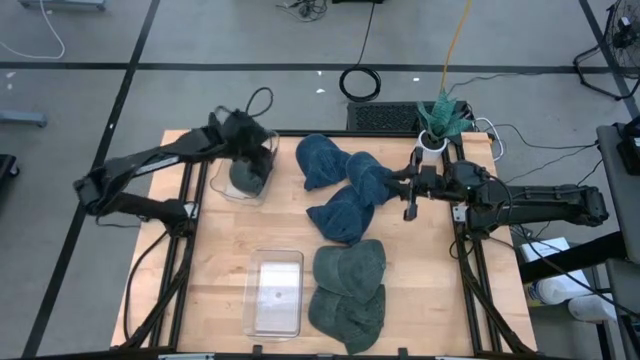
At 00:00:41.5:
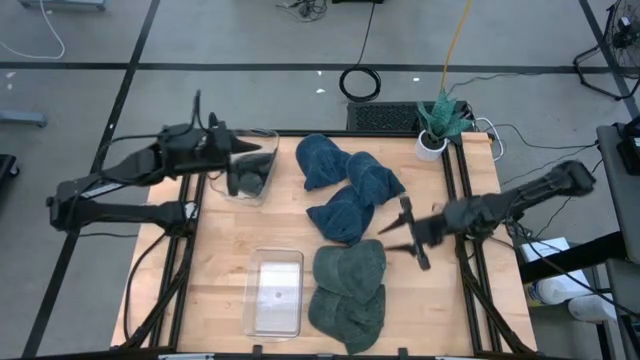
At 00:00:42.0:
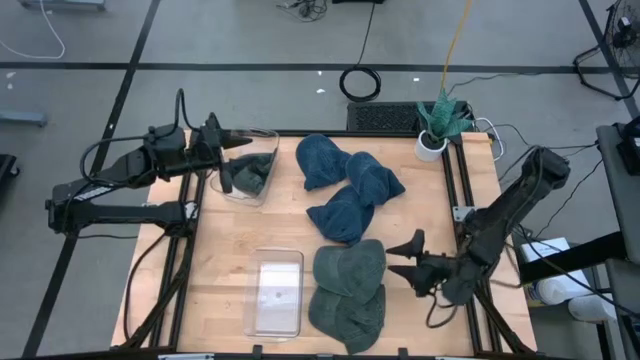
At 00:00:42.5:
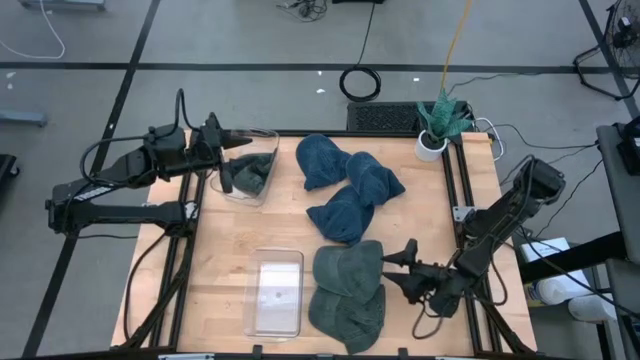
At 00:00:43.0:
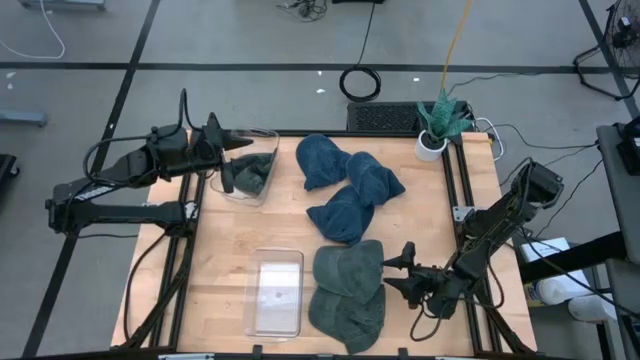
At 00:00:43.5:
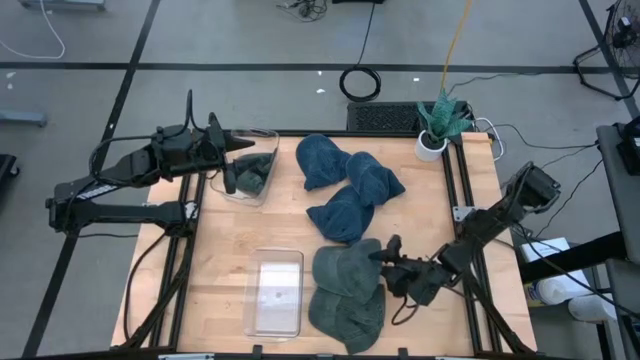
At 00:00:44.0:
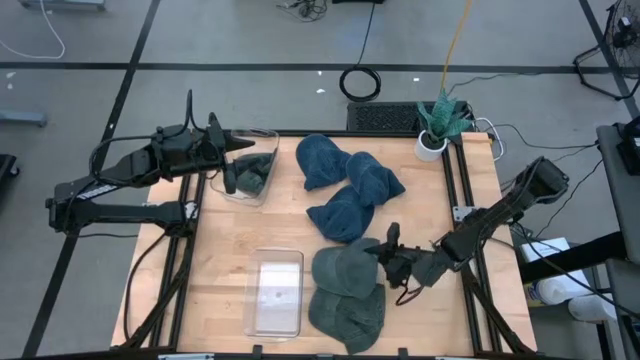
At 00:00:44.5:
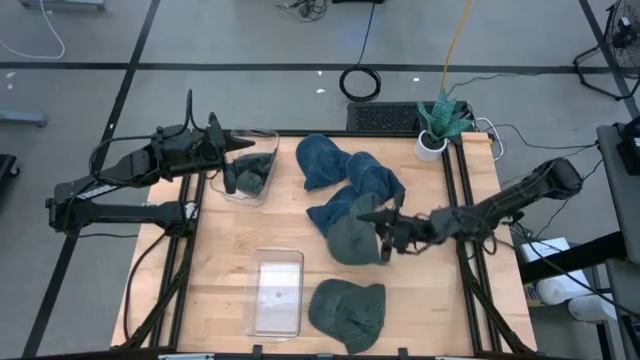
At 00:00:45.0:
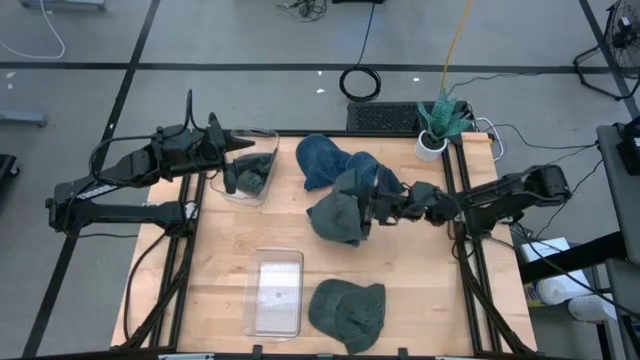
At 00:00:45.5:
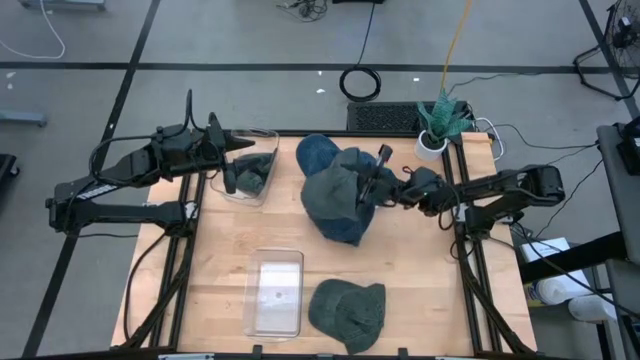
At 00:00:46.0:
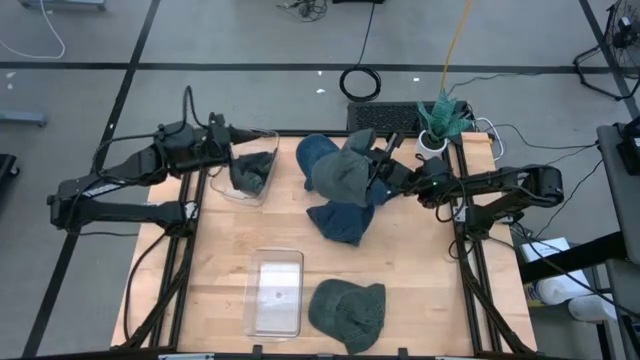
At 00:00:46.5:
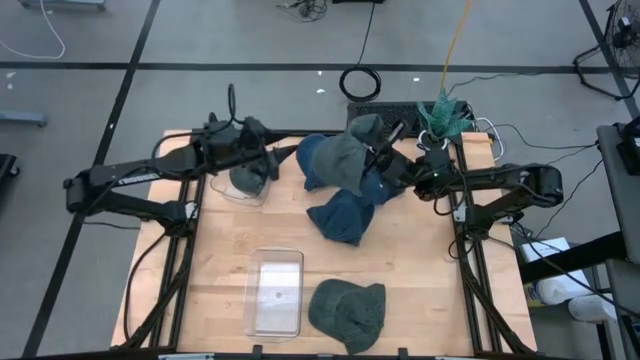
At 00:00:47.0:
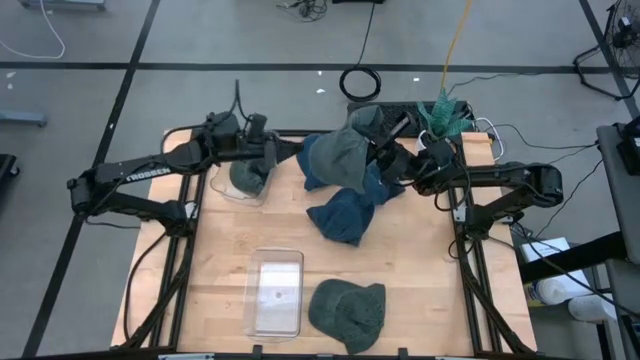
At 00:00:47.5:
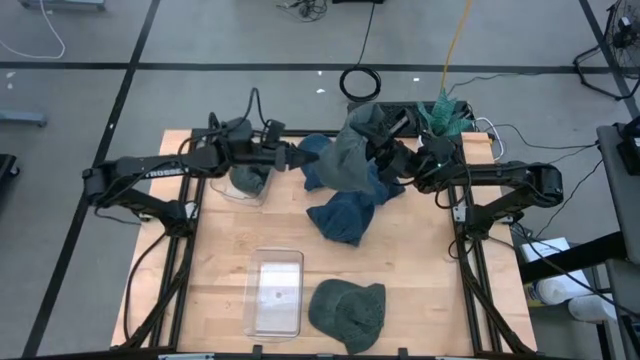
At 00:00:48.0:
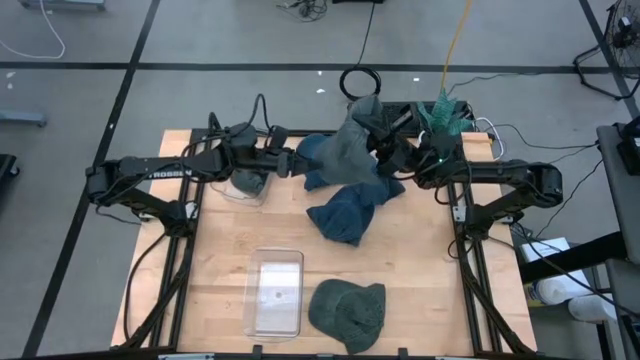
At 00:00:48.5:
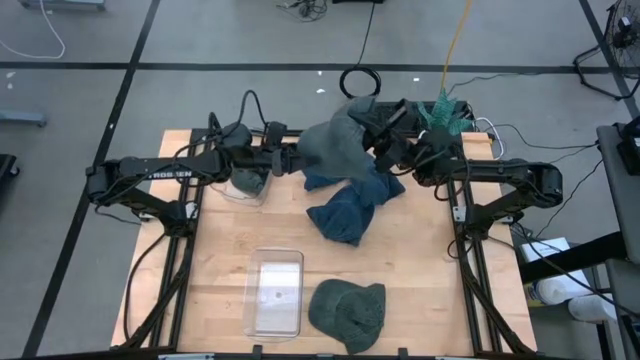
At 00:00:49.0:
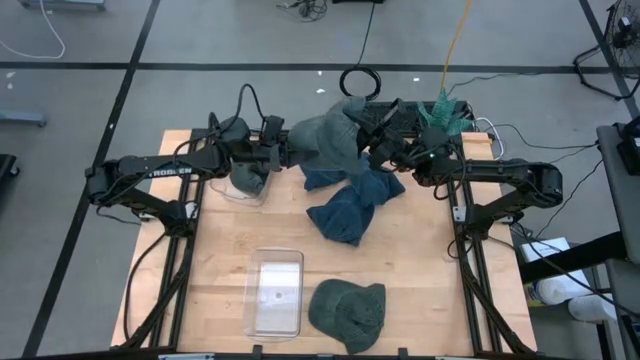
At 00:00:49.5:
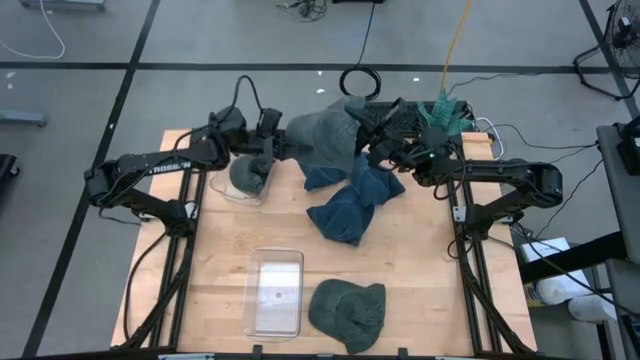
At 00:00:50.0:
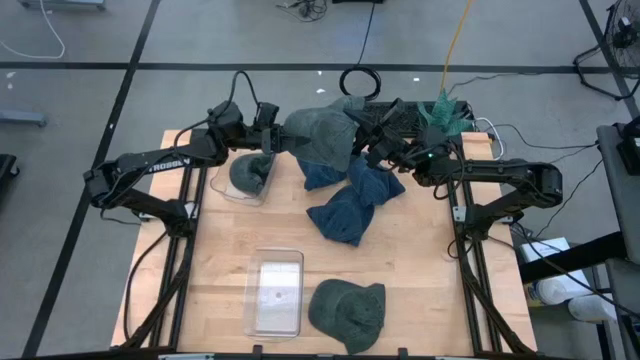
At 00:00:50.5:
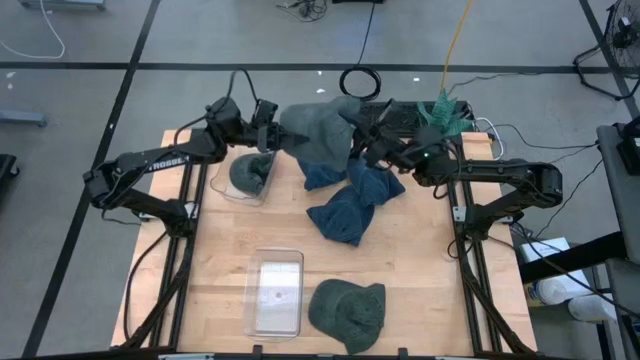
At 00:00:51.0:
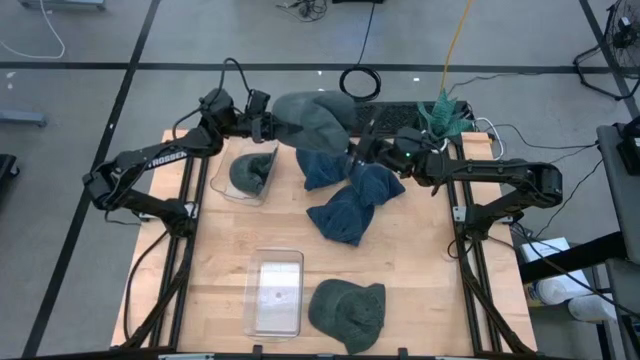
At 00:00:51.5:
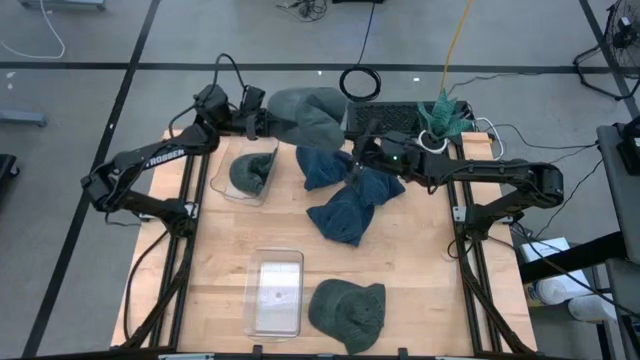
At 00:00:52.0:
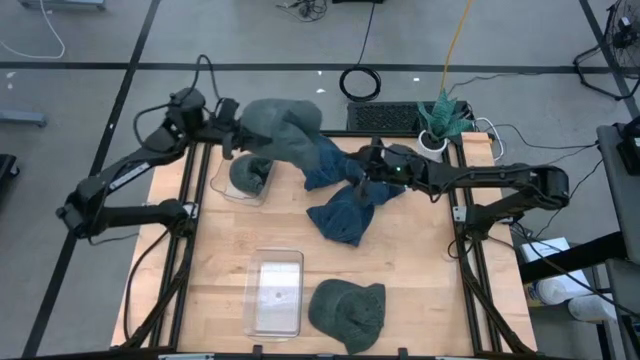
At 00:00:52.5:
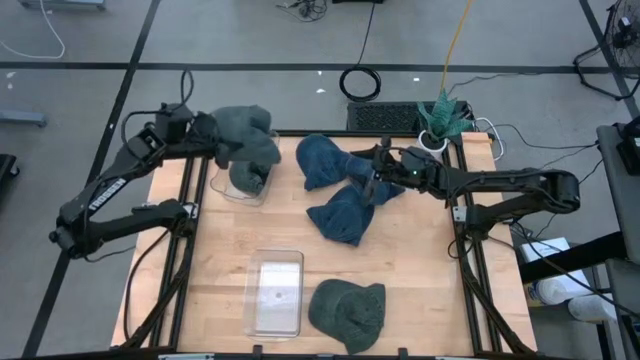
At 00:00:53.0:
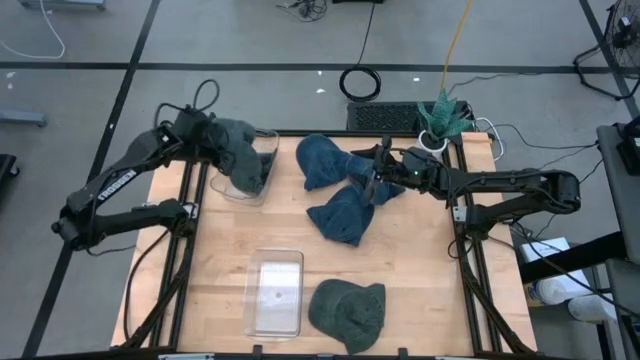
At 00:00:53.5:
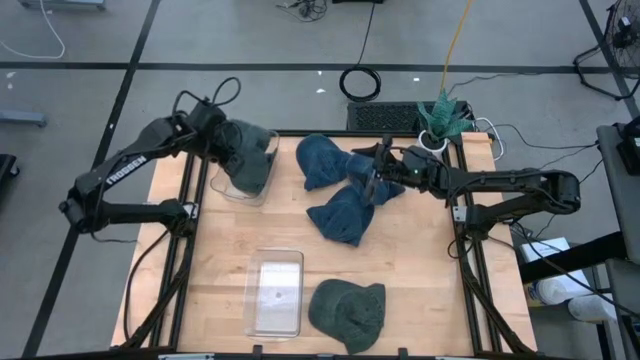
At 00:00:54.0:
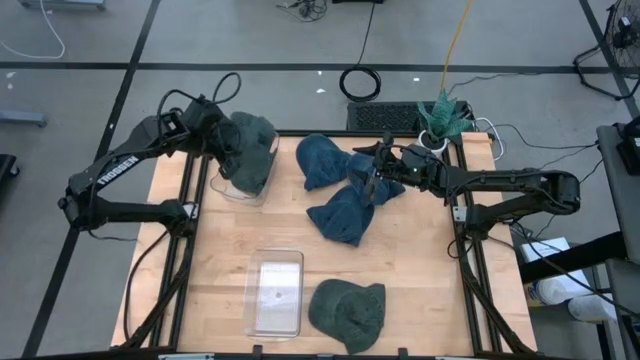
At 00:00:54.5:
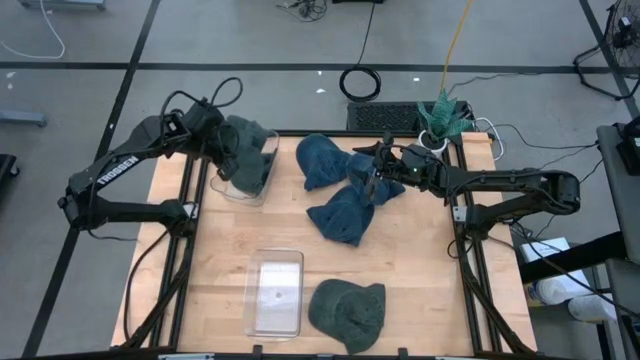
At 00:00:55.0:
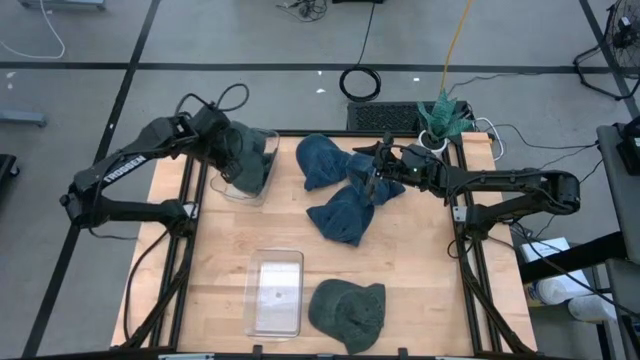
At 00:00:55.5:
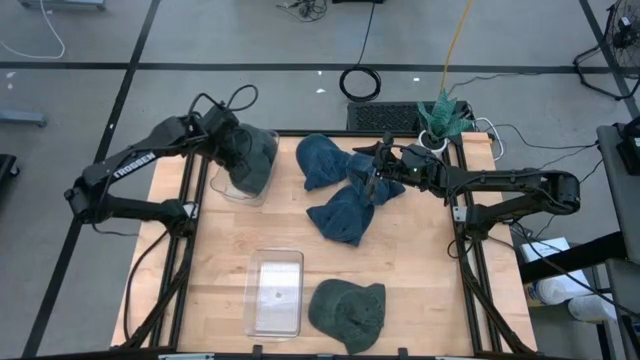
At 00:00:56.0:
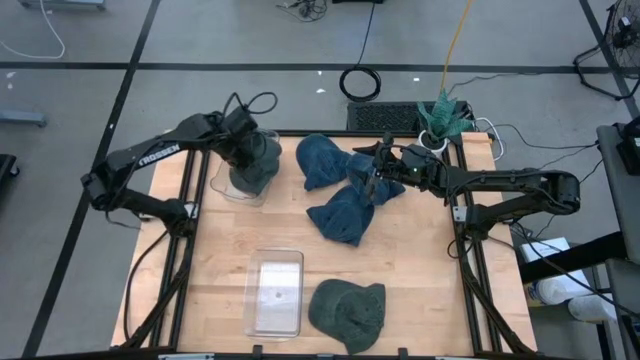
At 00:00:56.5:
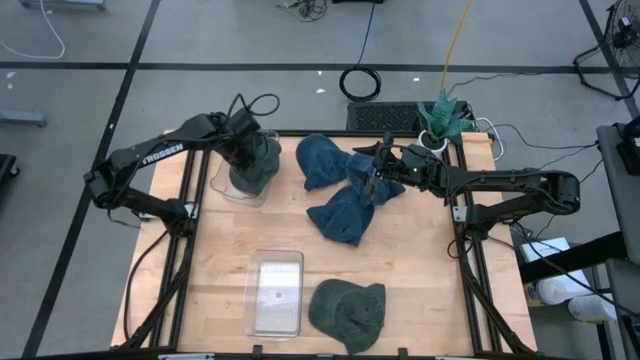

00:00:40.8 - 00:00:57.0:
Task: Pick & Place hat
Put the top green cap into the top transparent bin
